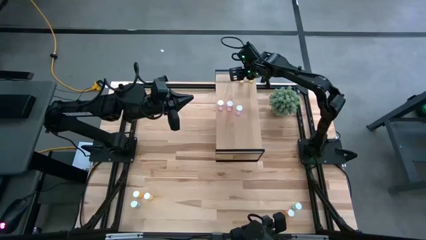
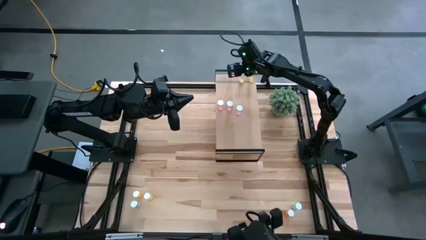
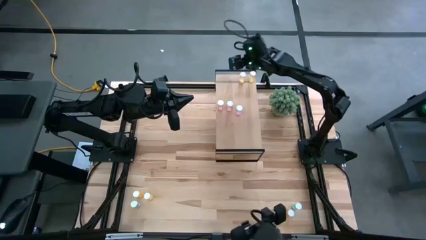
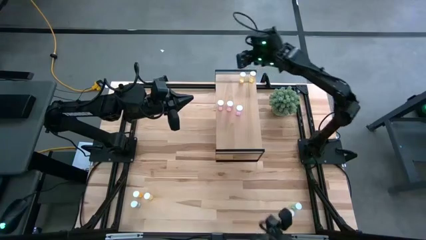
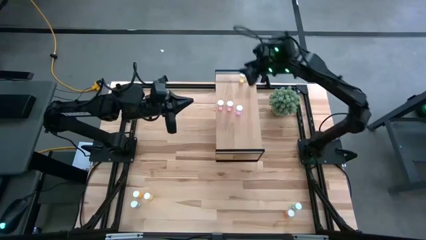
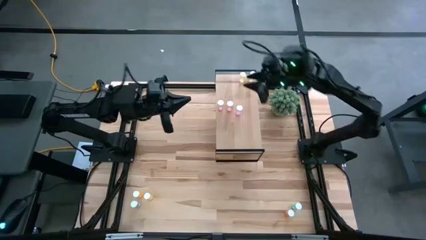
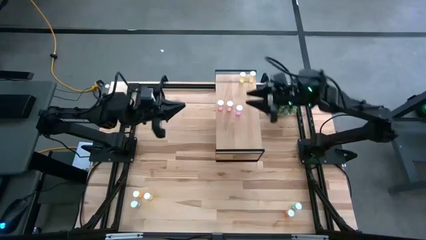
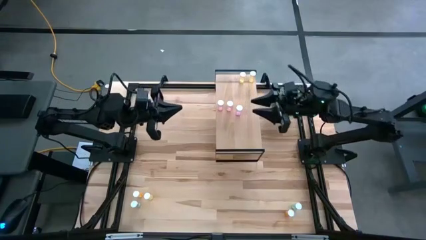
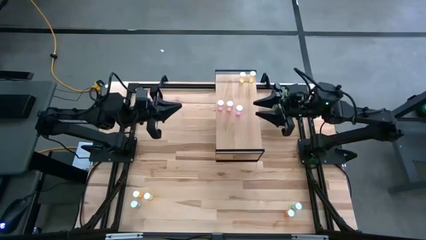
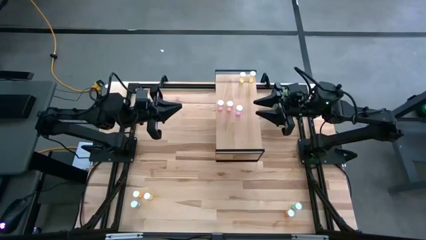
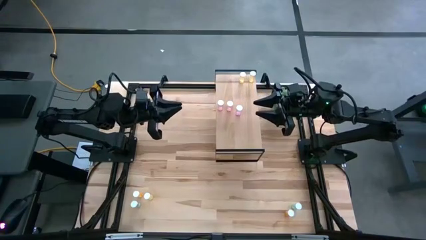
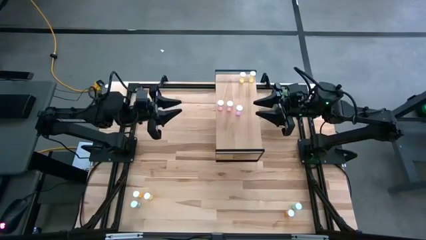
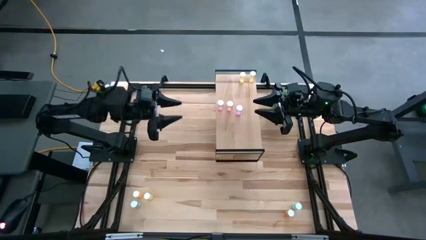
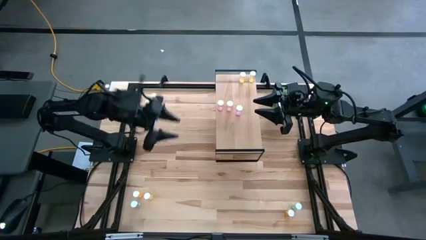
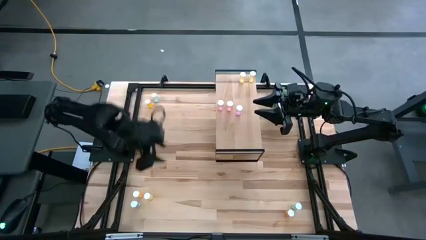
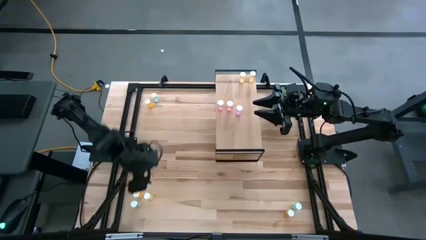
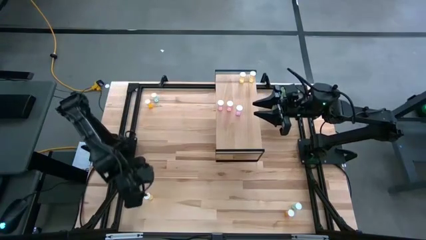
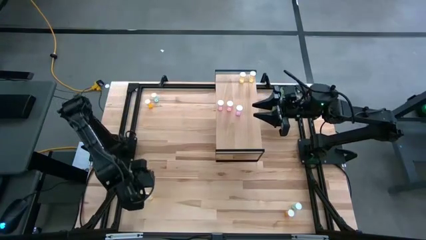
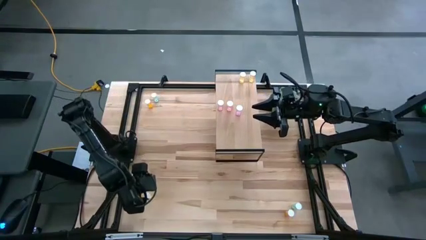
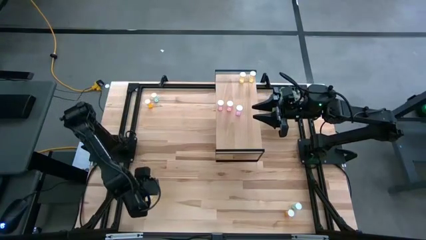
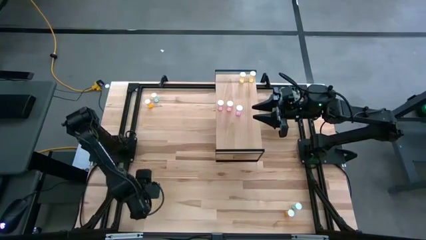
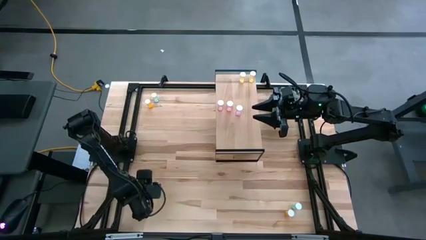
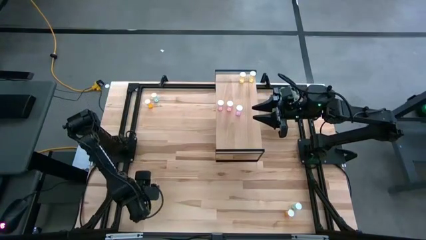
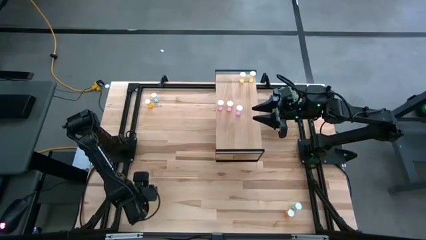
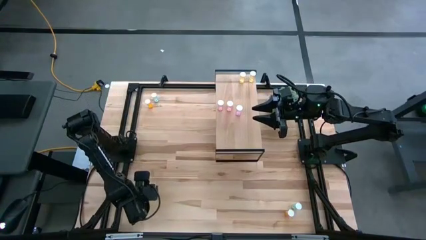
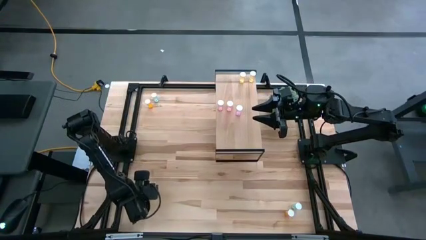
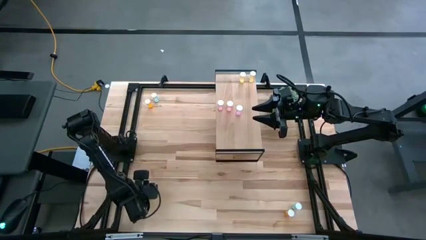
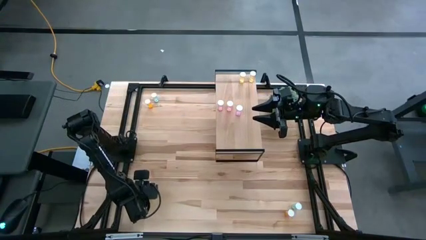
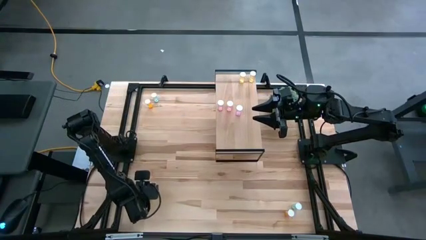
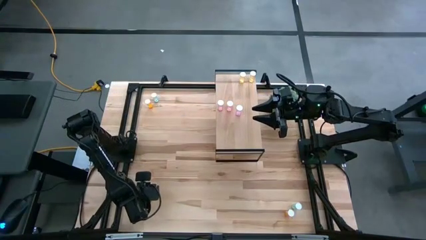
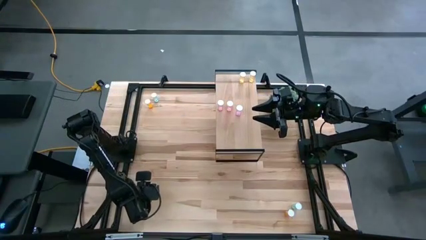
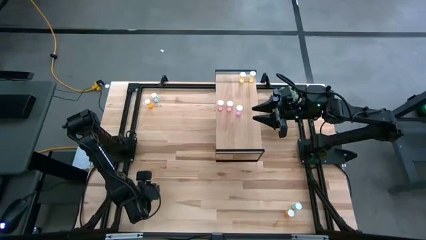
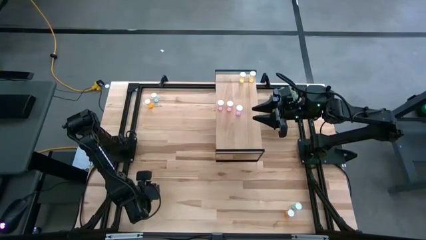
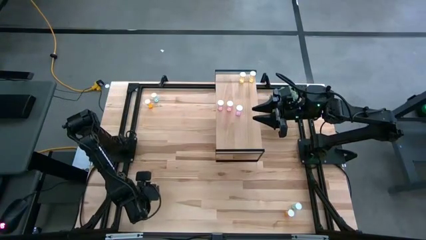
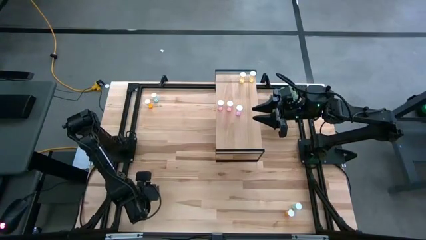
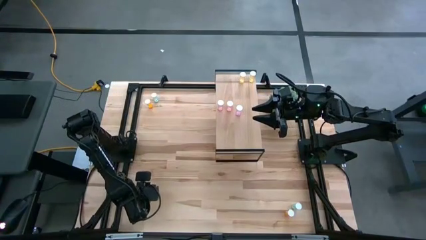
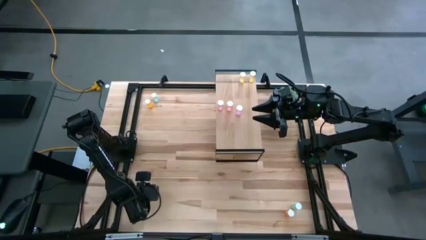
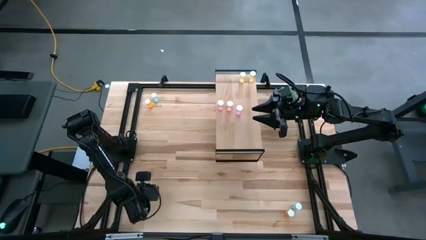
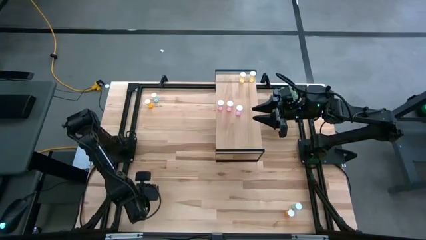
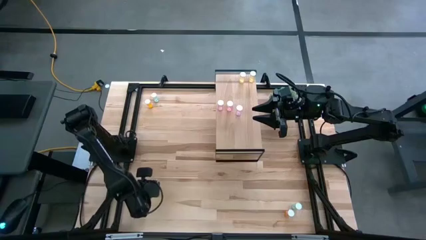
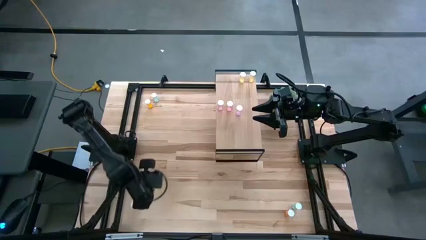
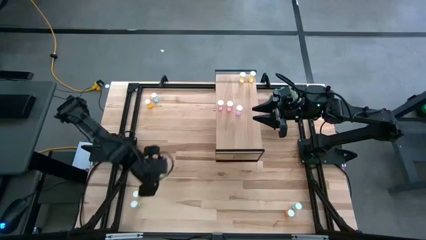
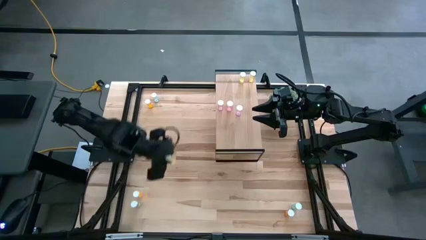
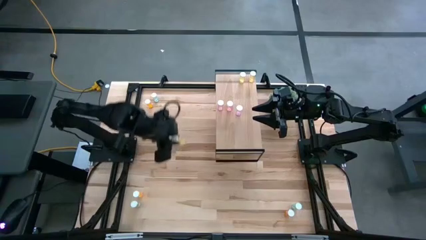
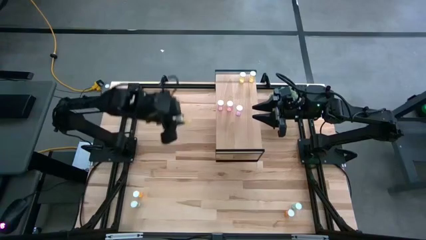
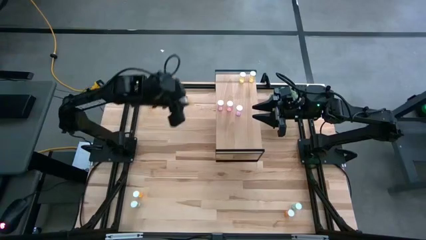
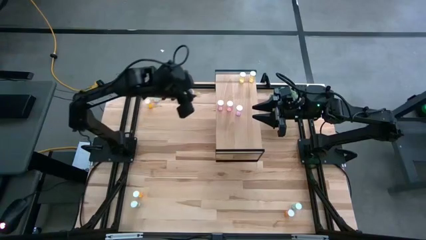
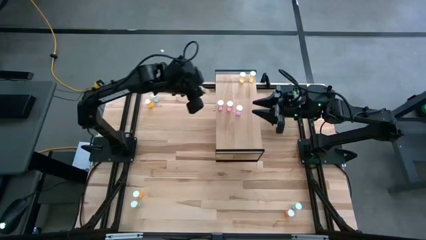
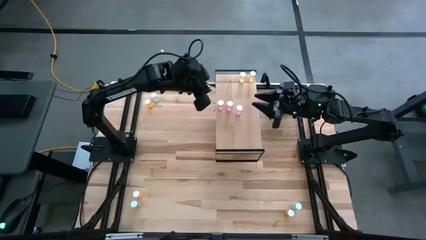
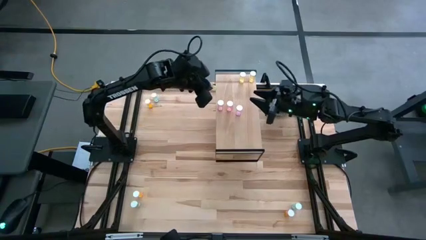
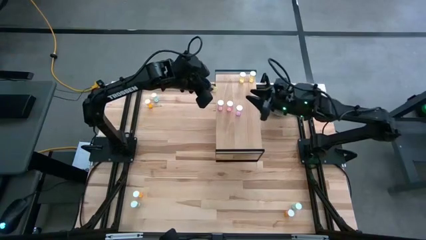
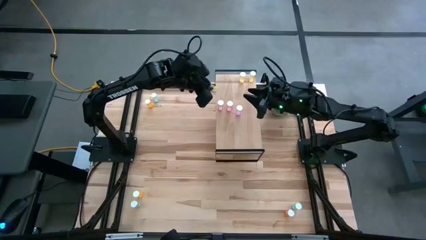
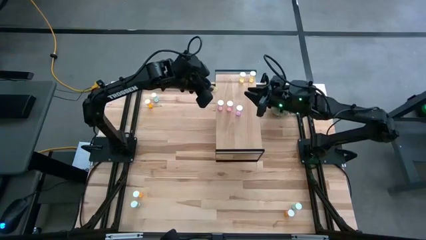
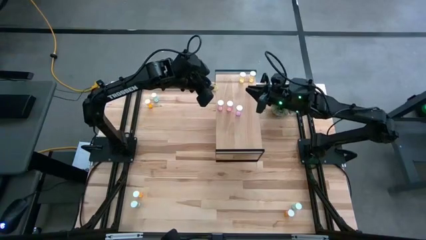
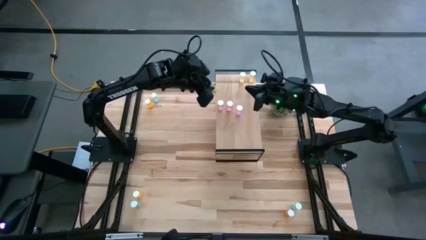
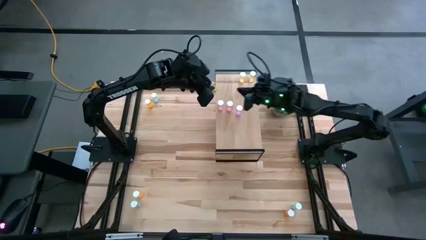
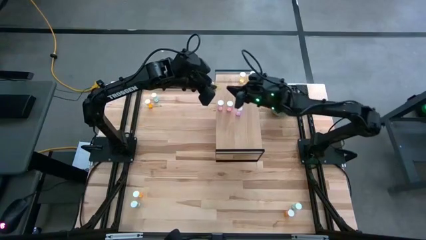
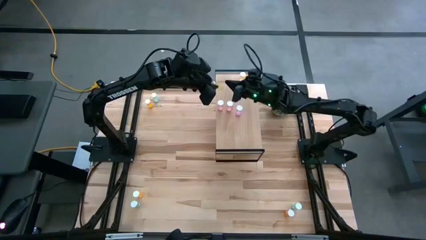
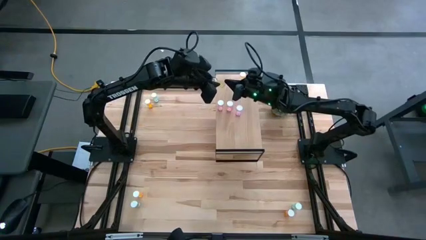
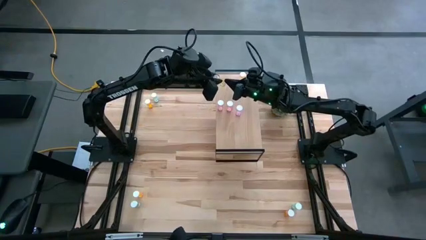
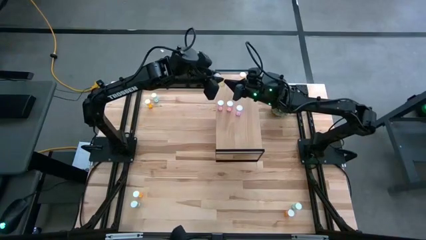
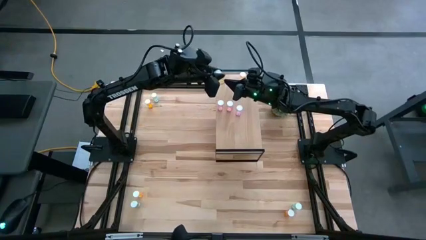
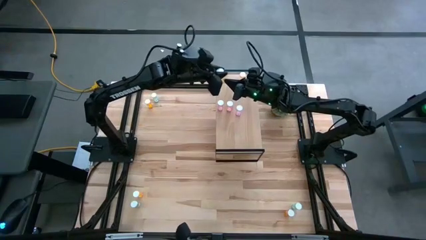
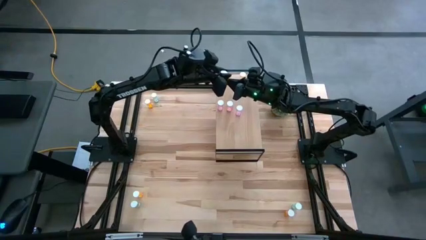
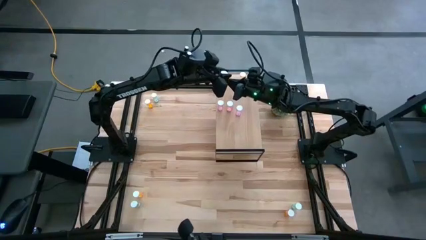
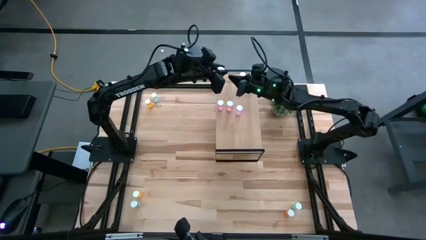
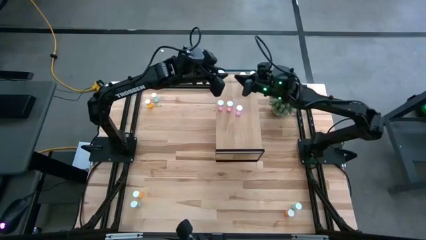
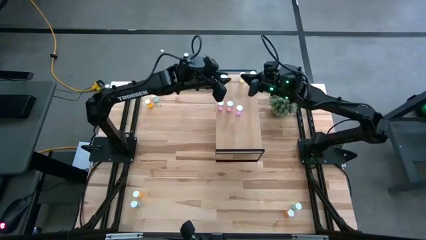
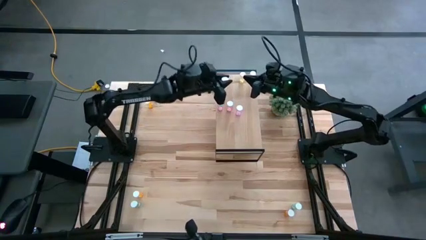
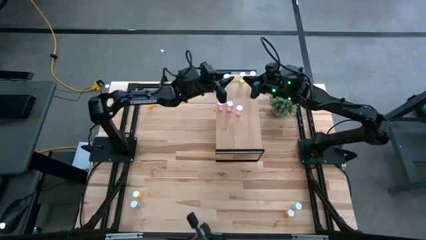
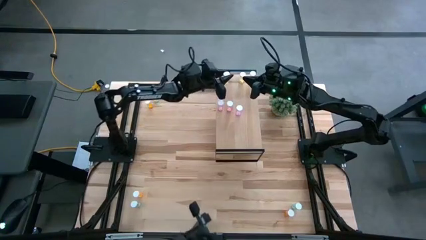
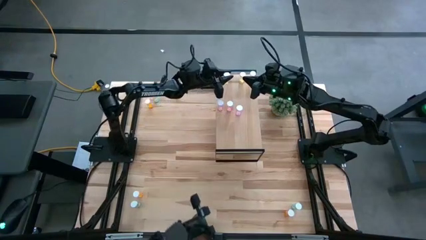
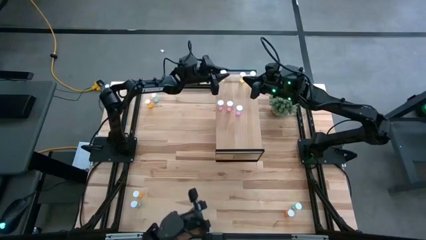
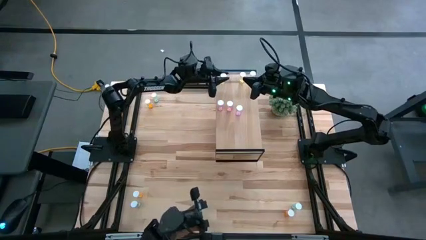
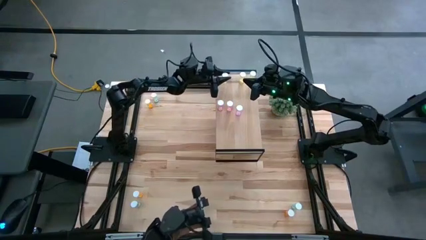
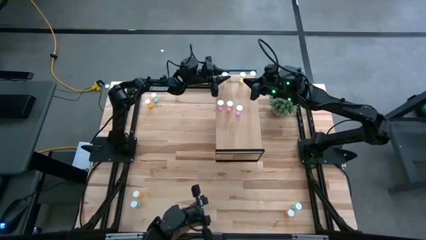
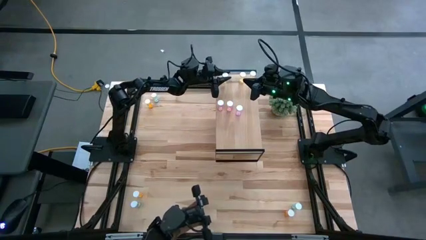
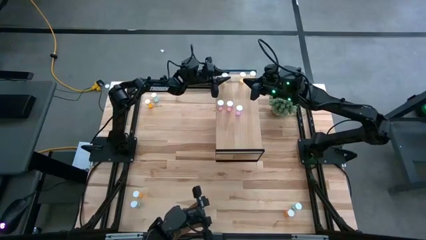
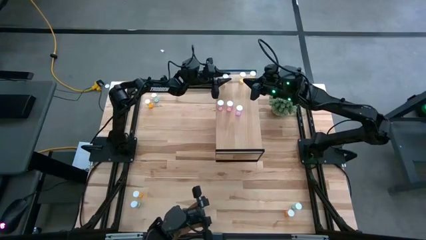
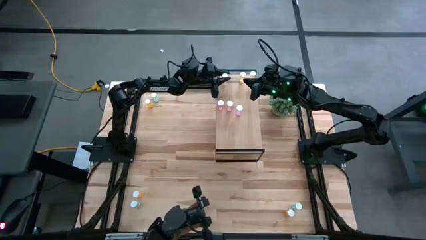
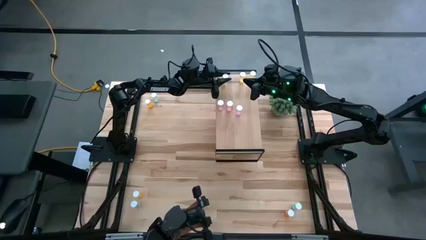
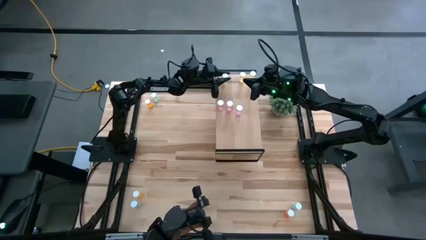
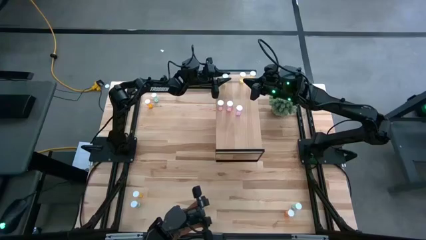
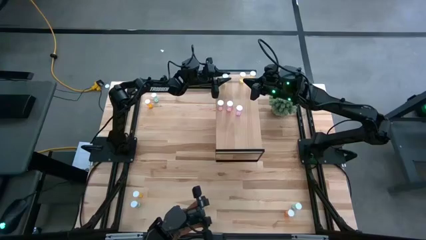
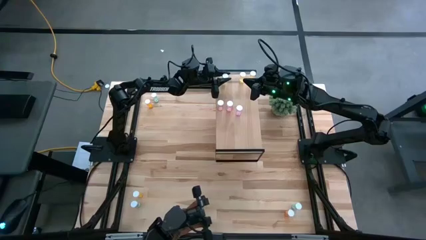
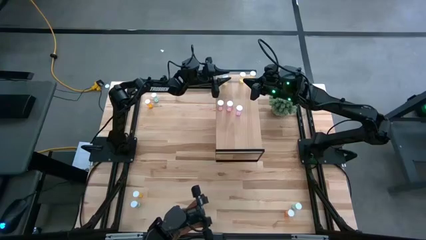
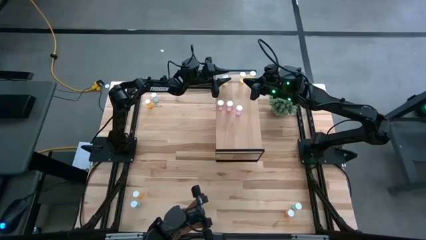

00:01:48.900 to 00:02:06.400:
Task: Pick and place medicine bottles onto shelf by color
Put the yellow pill bottle on the shelf aligned with the other yellow pill bottles
